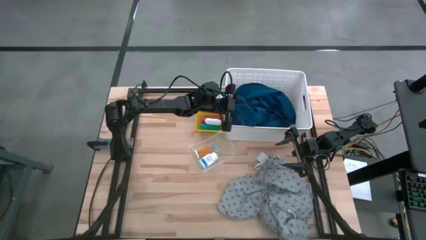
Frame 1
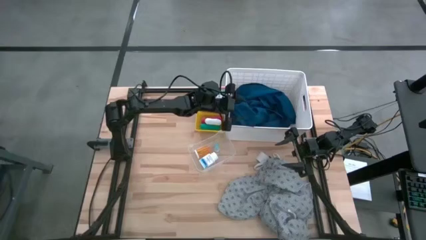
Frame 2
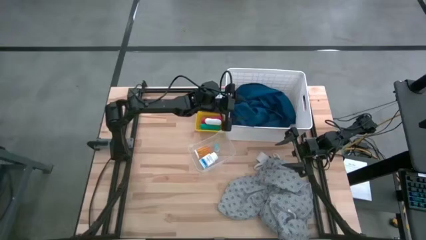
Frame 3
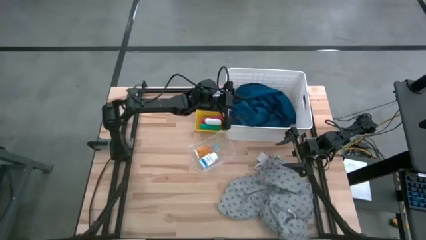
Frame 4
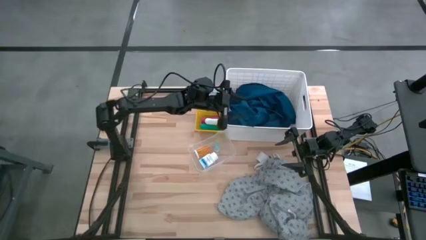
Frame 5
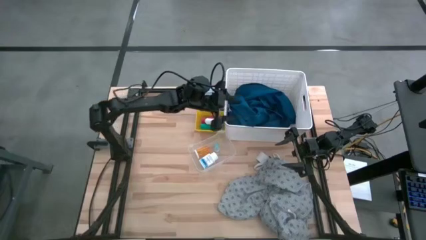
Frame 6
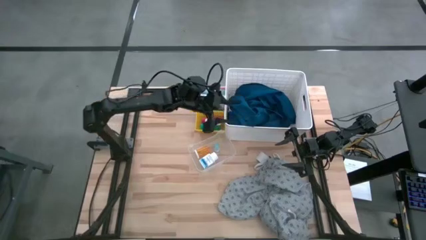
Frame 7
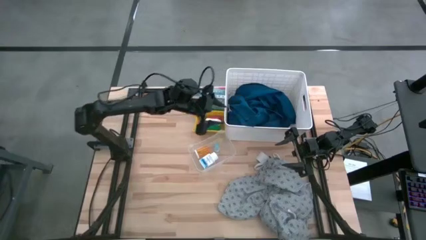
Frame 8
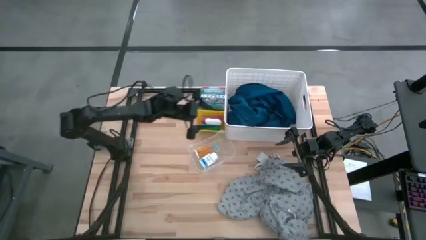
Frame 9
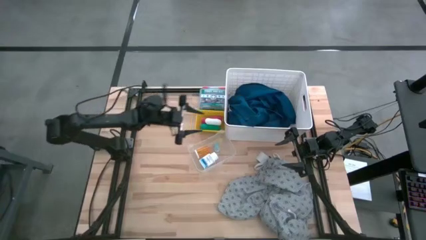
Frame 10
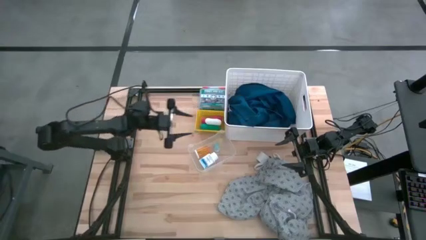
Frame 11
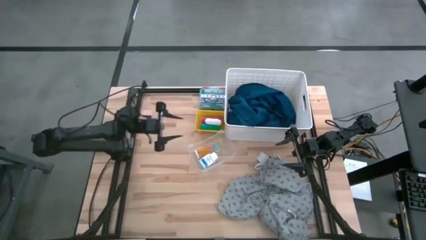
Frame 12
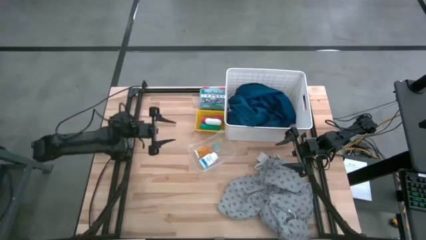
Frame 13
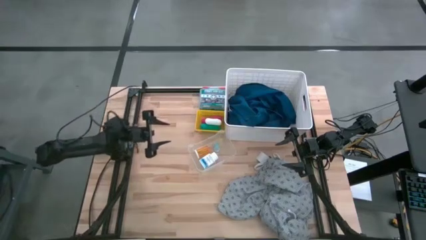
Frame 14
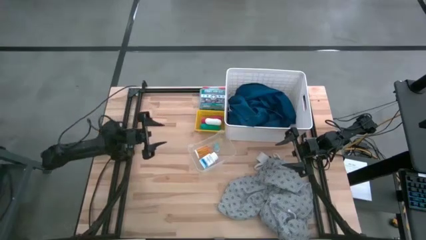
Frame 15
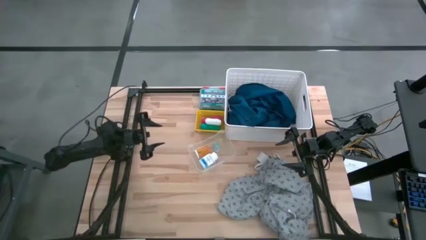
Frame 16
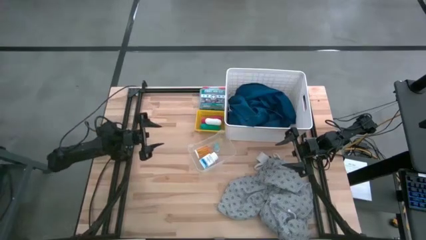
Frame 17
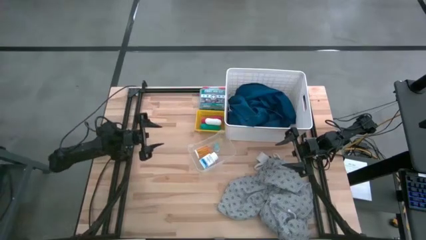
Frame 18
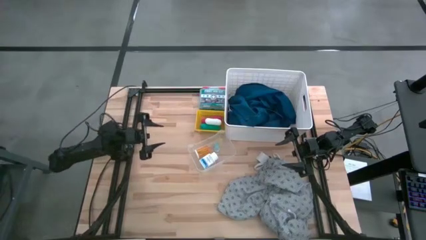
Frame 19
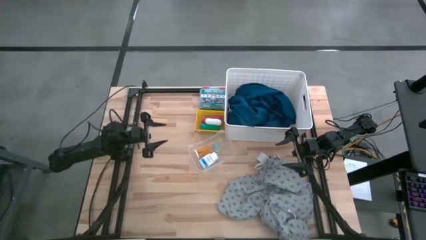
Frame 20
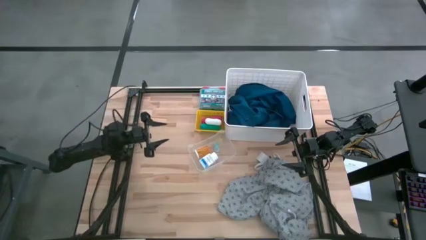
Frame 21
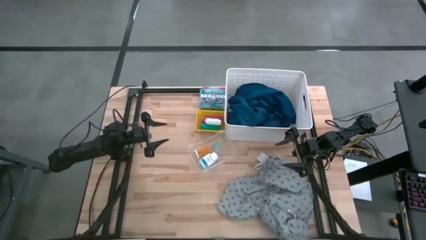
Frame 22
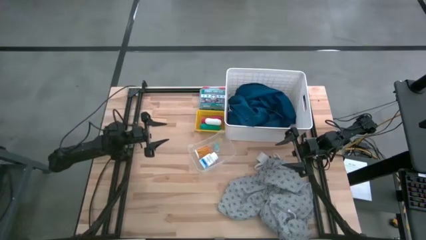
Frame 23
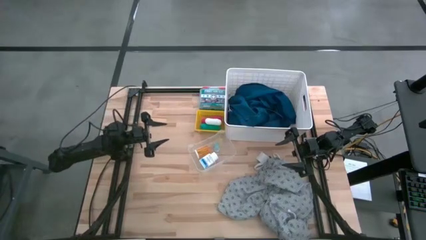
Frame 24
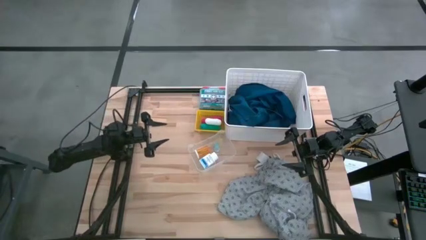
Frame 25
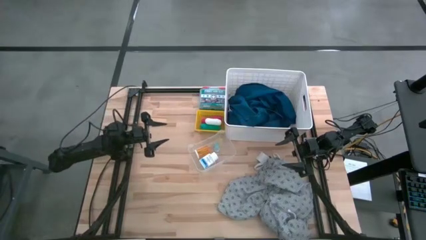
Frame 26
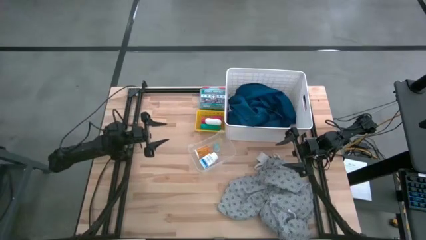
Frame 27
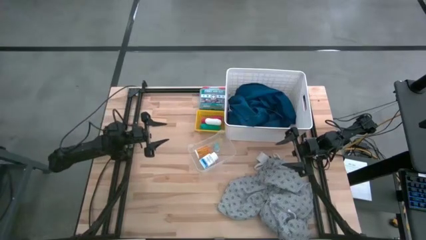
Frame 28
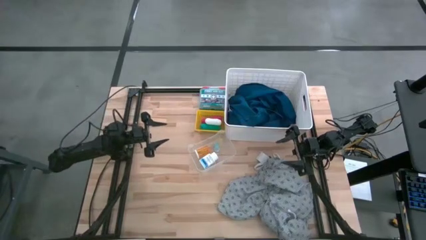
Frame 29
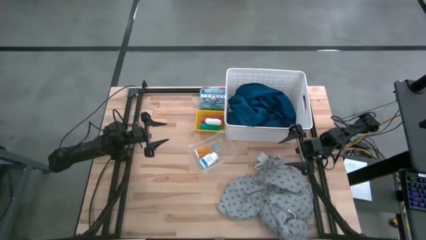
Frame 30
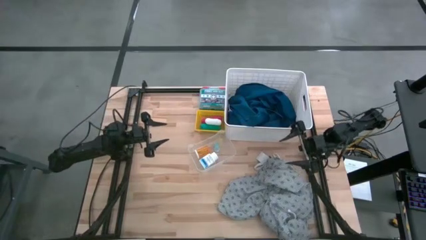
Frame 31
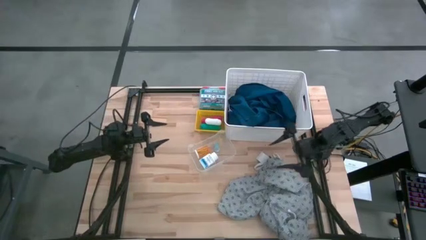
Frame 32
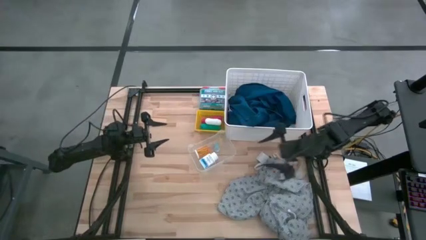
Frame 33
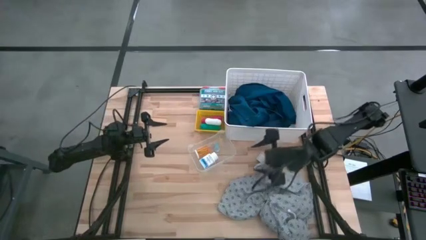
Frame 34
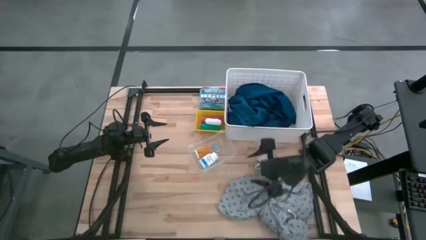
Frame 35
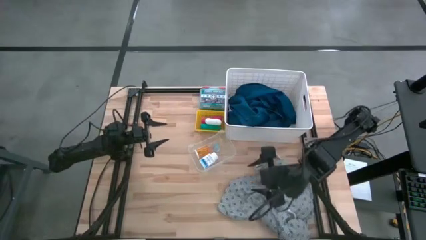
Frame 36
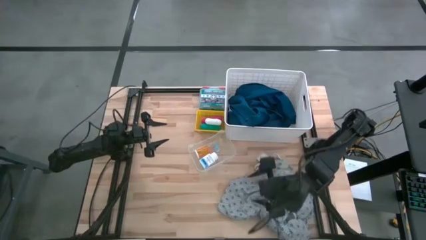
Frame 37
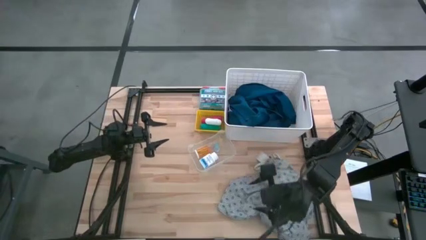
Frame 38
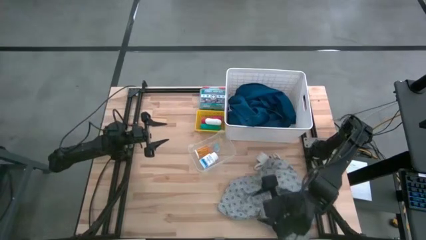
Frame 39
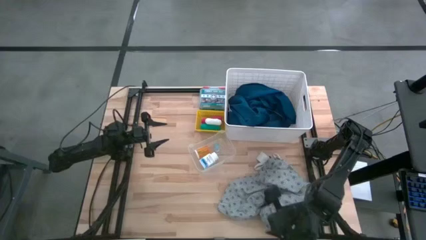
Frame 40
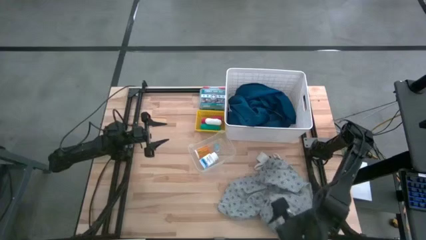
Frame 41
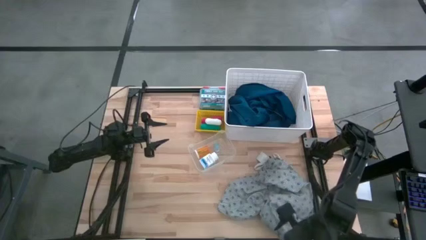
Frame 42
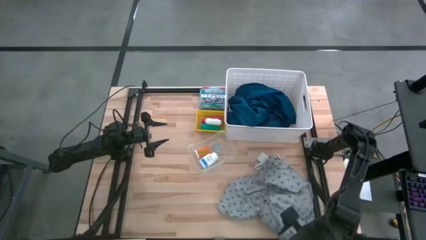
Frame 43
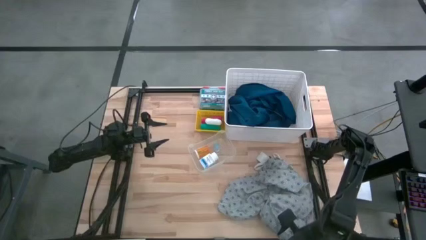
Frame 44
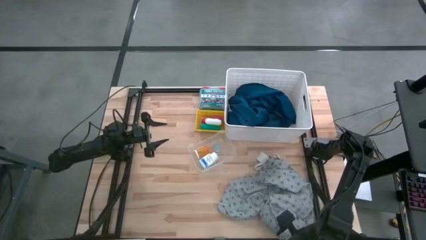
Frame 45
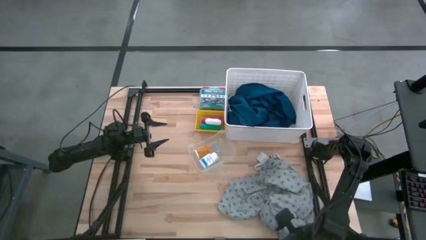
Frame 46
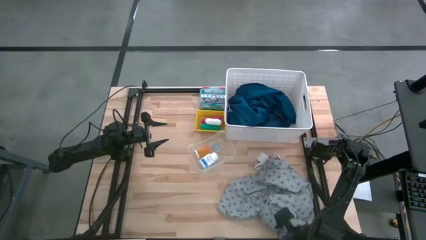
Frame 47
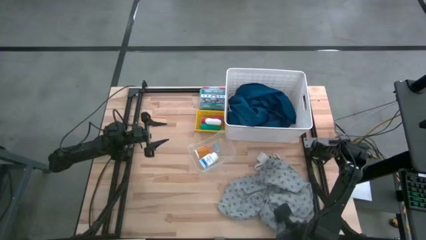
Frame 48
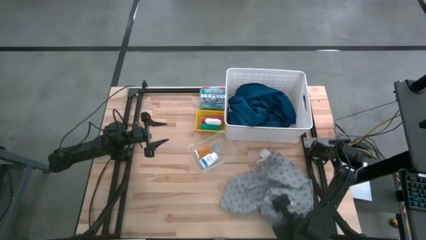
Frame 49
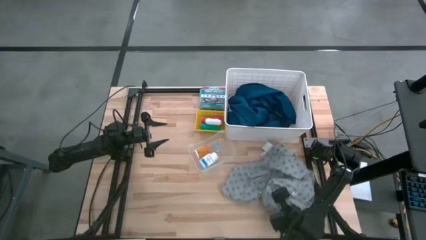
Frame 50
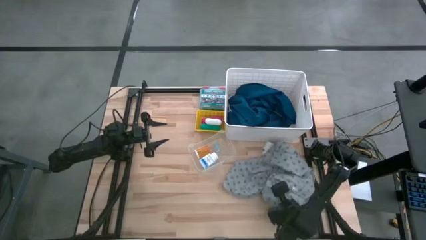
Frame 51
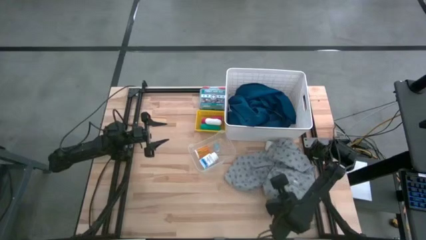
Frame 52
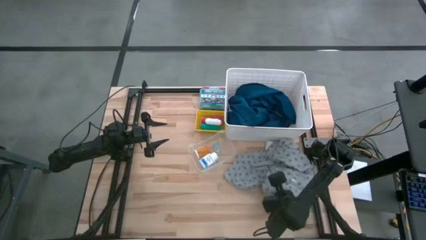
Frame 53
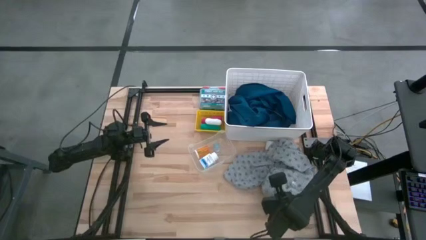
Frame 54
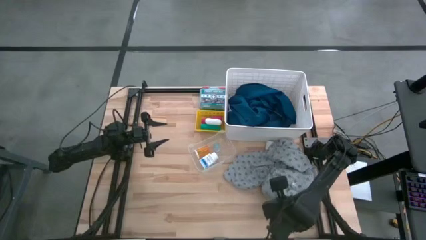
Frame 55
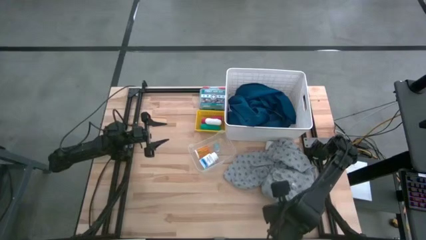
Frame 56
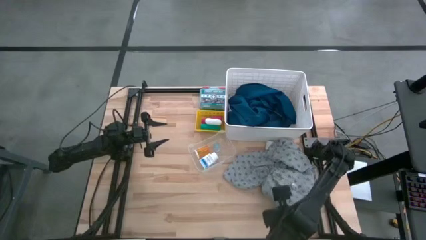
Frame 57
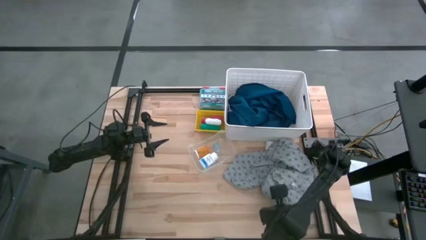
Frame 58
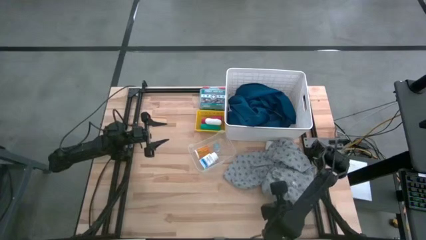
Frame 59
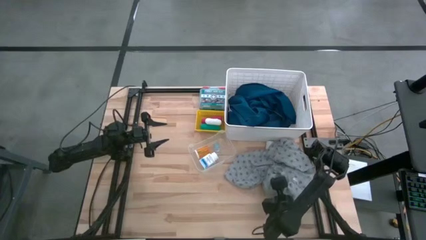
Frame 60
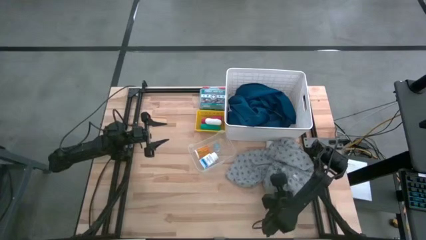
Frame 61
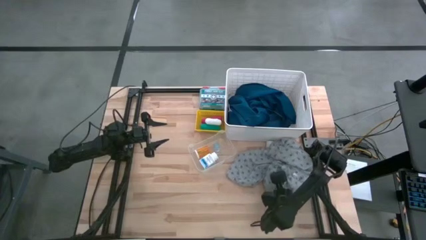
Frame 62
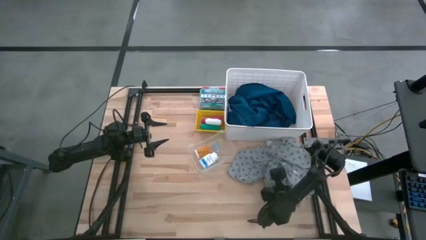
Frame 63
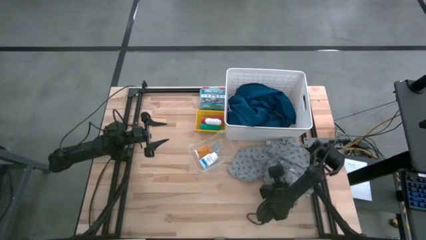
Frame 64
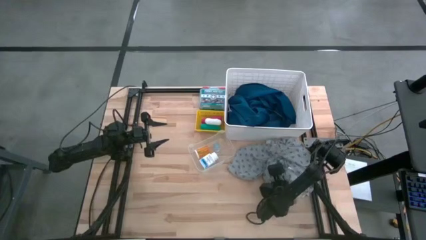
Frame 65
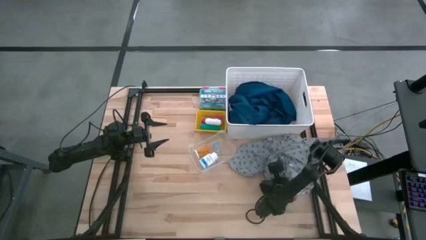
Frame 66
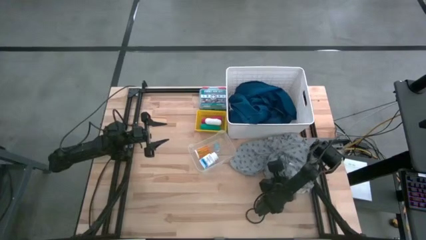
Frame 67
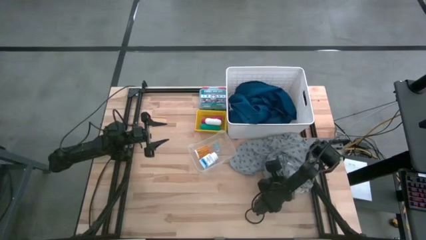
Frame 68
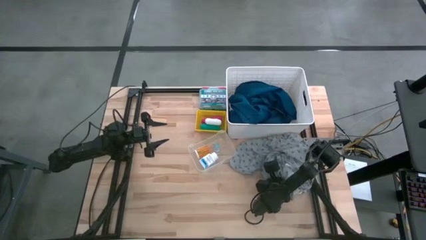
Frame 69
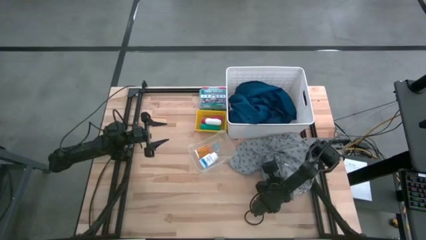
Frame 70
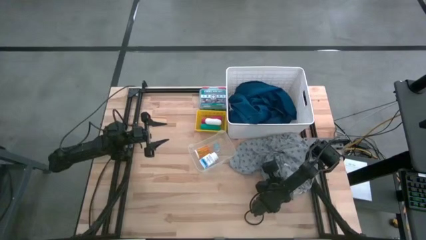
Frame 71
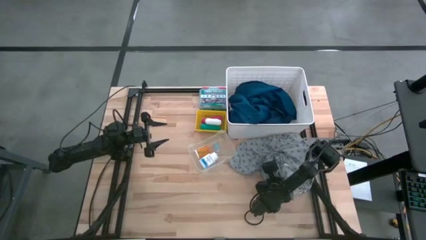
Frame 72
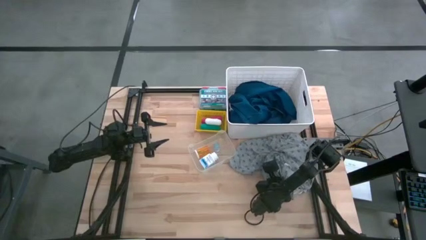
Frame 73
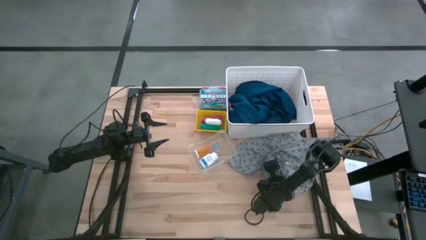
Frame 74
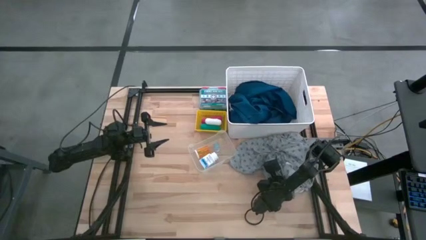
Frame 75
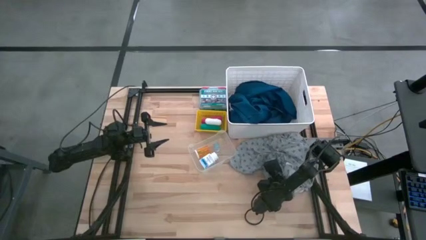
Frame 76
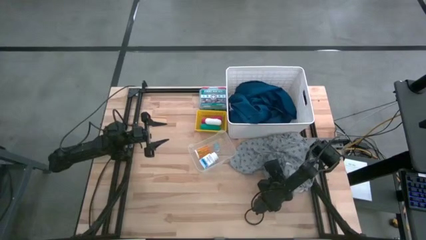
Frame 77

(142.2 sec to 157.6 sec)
Task: Pick & Place Medicine items
Put the gray patient gown into the white bin
